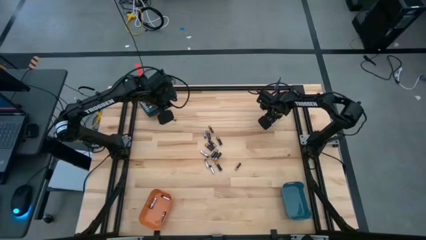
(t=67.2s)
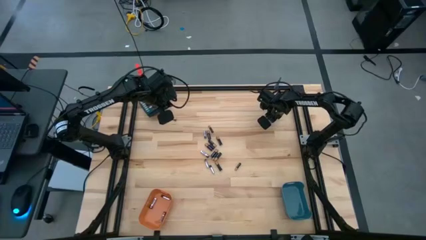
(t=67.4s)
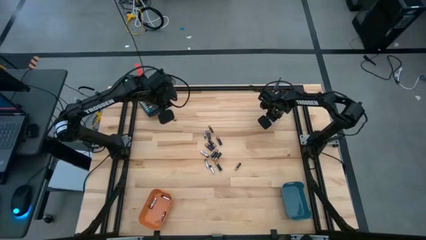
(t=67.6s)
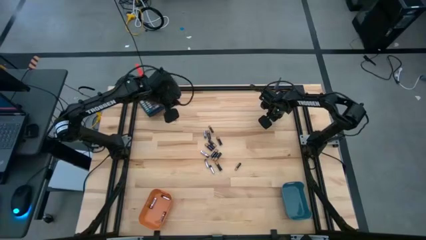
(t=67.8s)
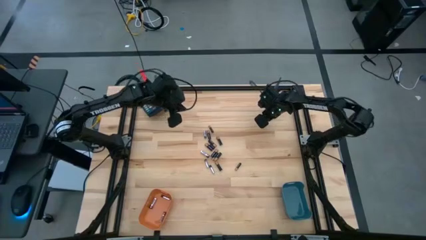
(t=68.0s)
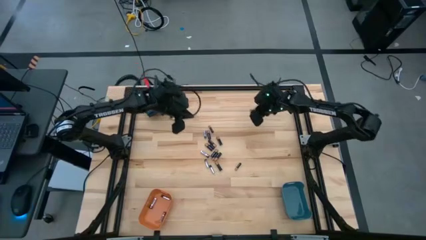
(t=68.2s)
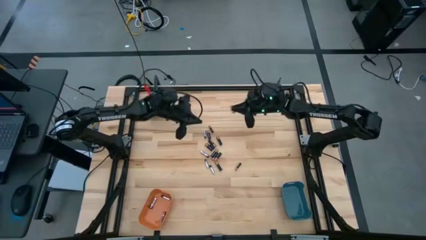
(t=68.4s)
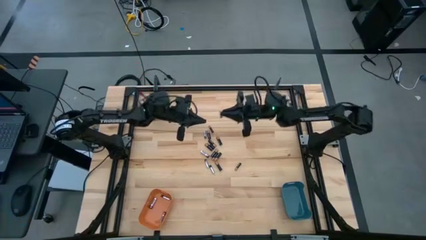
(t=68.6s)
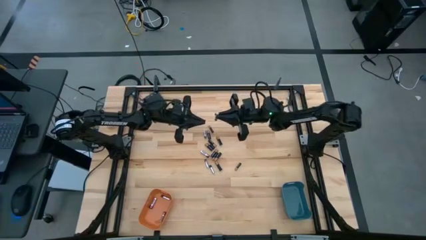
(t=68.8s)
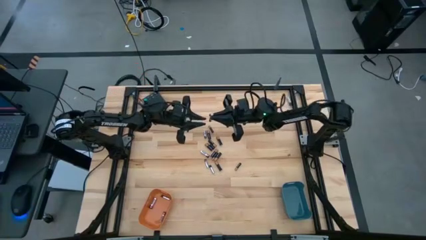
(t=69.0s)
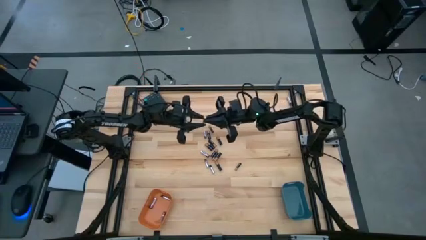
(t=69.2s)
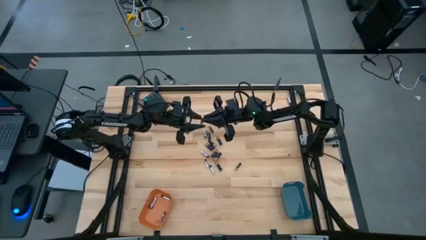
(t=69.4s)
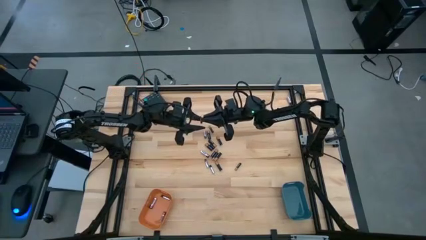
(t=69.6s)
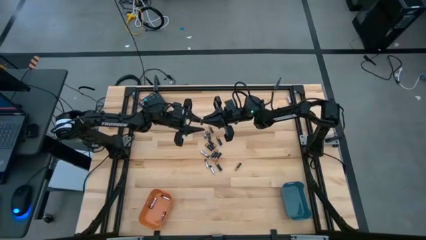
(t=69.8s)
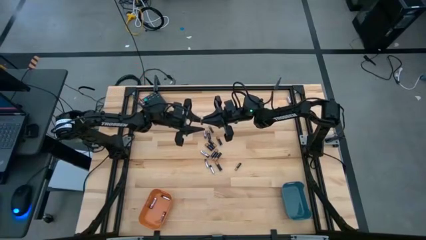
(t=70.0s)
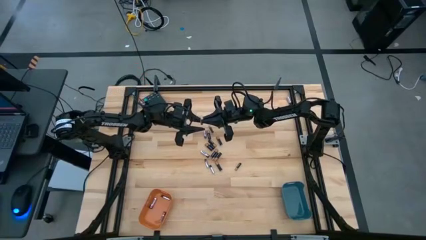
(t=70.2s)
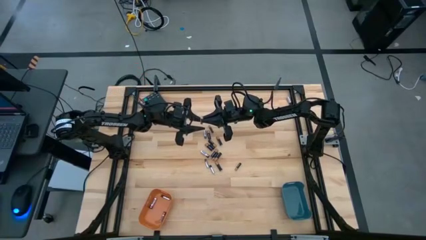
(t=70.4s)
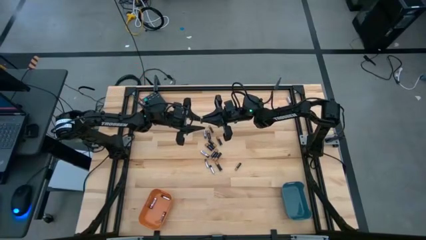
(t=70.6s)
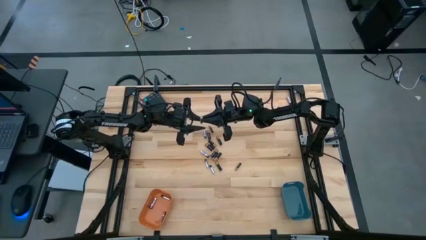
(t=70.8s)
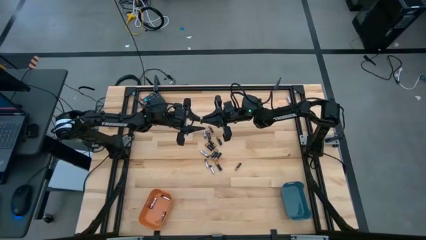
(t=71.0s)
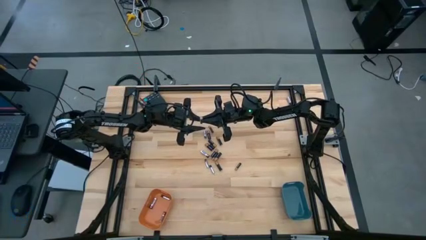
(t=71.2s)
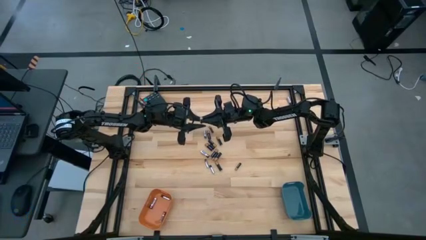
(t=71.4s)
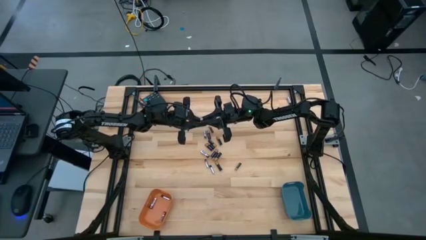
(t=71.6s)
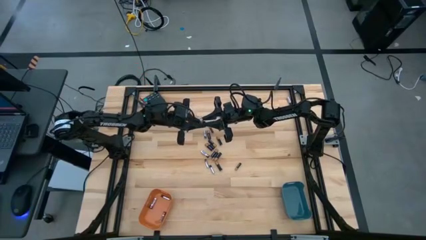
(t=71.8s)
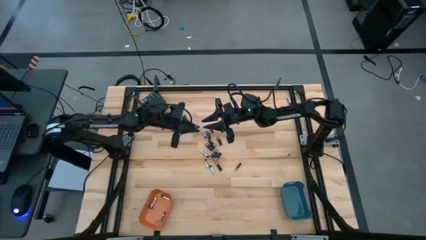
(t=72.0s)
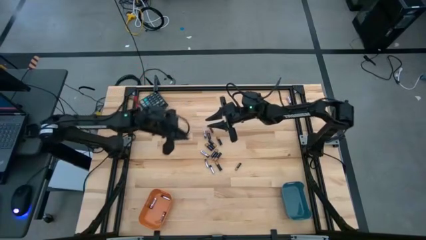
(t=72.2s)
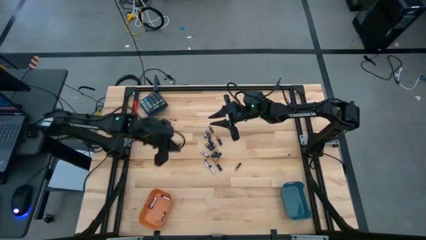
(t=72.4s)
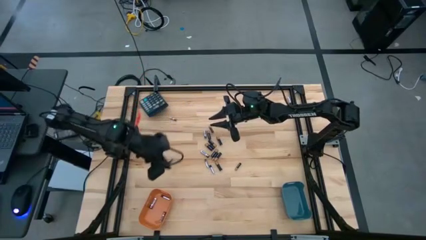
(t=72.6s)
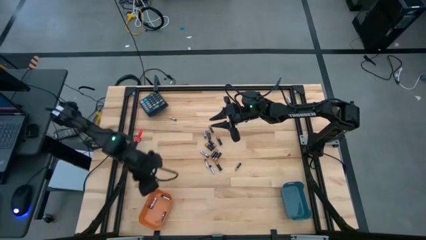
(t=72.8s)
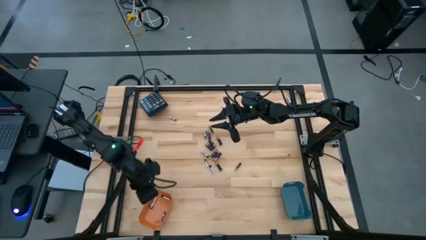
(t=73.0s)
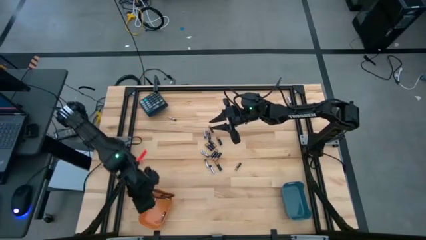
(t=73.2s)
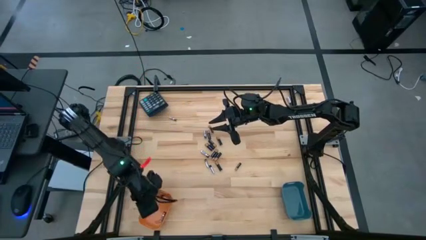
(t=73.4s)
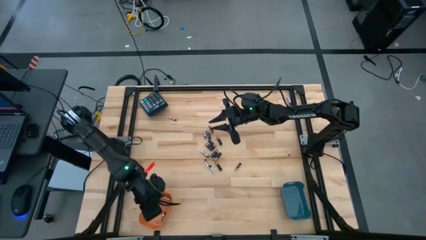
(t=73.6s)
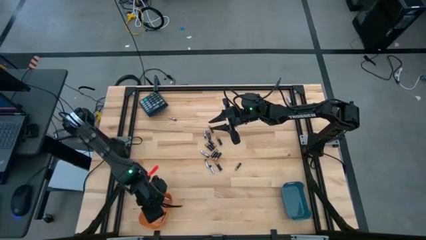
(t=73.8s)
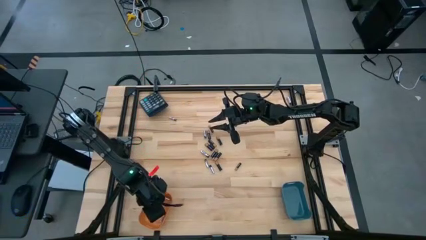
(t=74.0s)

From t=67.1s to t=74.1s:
Task: Sort batteries
Put the silver battery into the orange bin

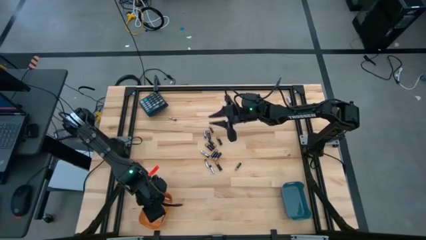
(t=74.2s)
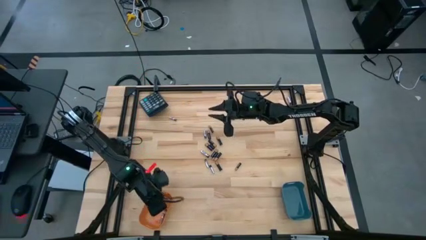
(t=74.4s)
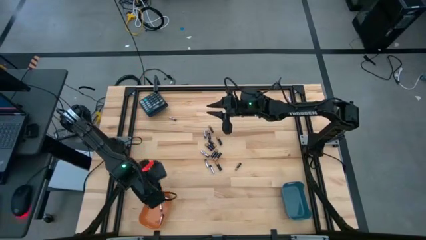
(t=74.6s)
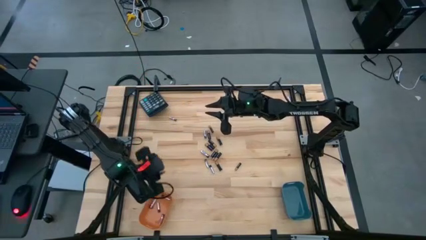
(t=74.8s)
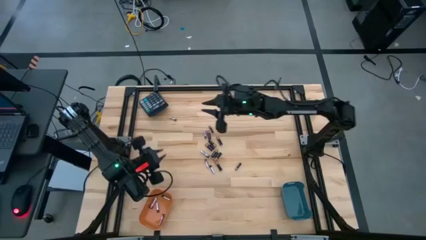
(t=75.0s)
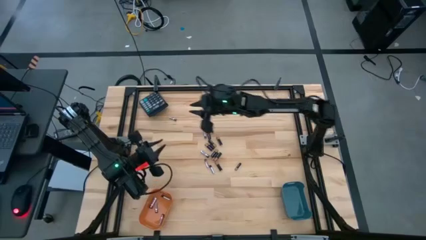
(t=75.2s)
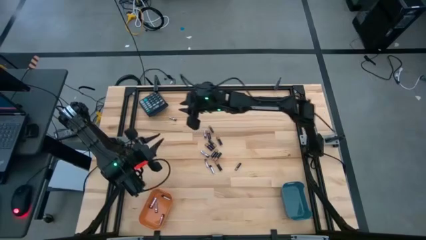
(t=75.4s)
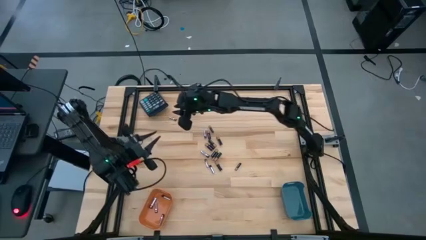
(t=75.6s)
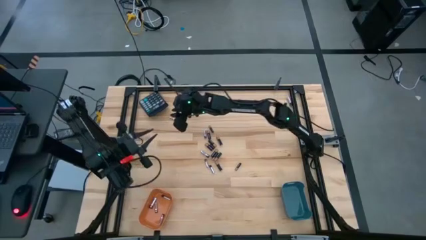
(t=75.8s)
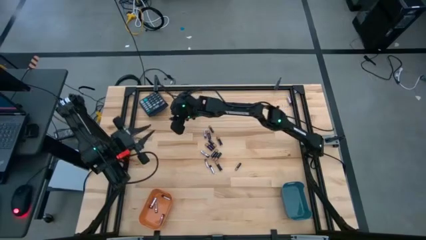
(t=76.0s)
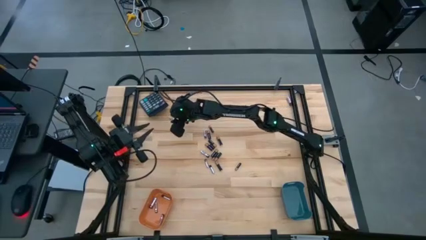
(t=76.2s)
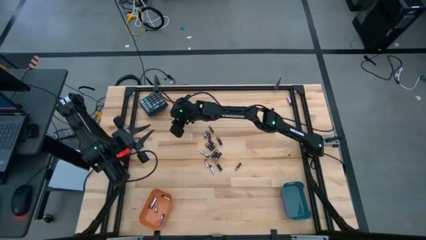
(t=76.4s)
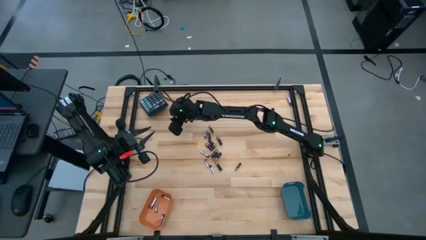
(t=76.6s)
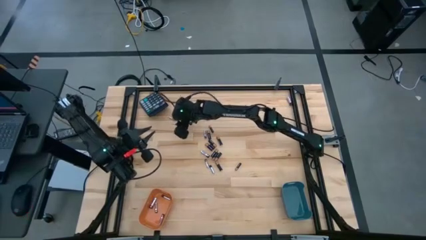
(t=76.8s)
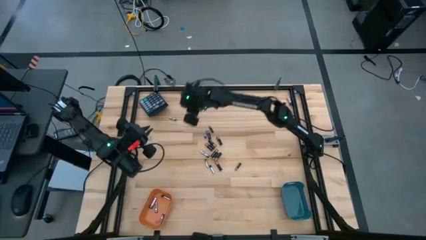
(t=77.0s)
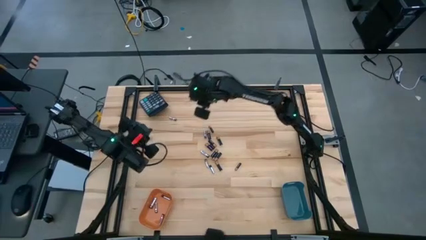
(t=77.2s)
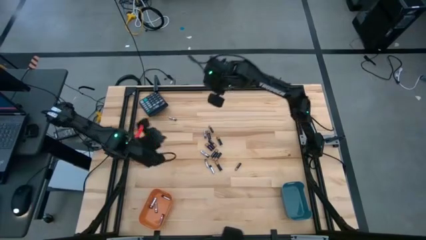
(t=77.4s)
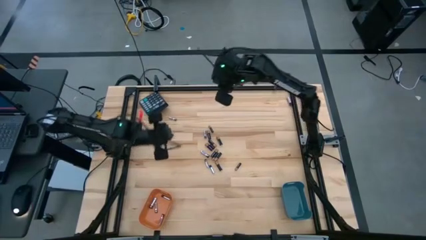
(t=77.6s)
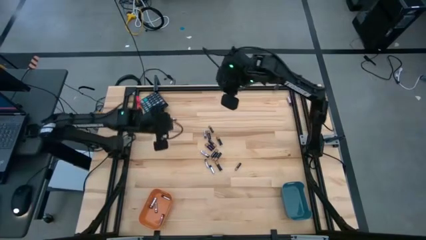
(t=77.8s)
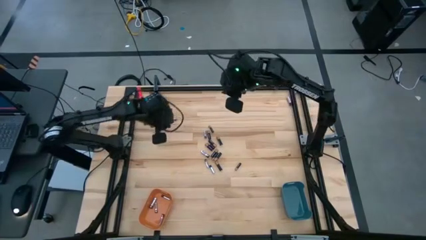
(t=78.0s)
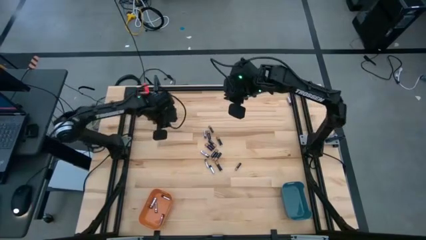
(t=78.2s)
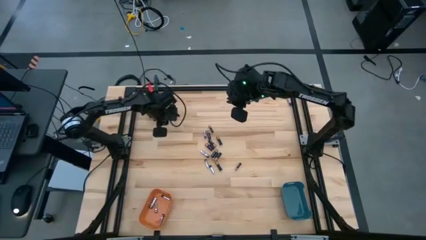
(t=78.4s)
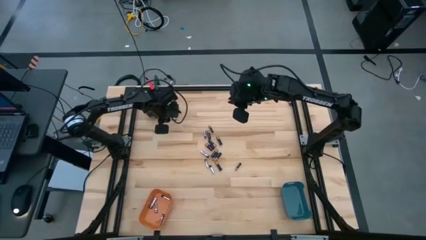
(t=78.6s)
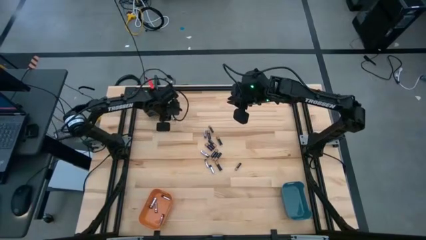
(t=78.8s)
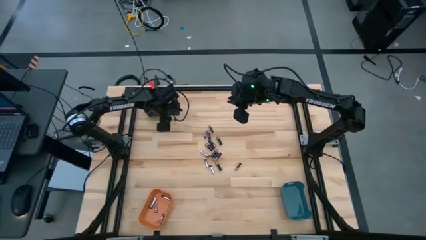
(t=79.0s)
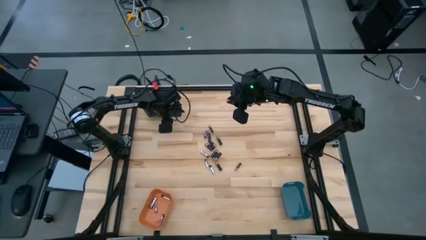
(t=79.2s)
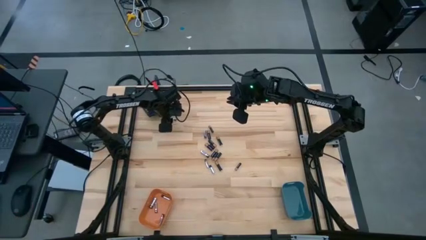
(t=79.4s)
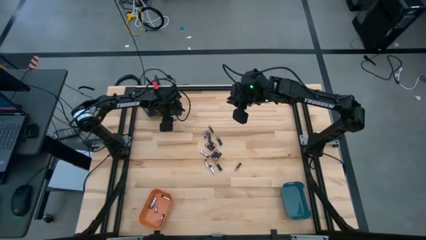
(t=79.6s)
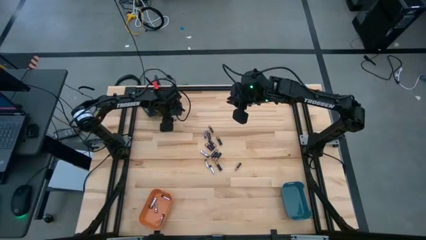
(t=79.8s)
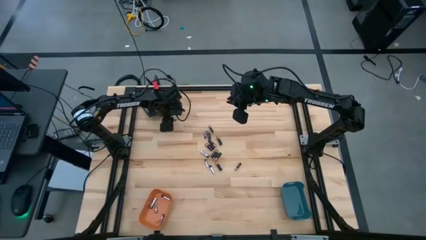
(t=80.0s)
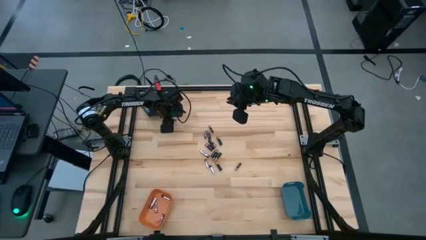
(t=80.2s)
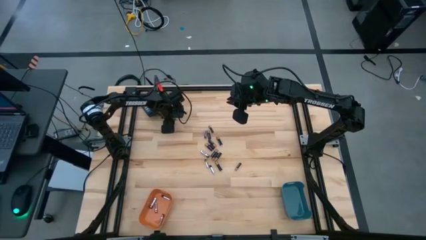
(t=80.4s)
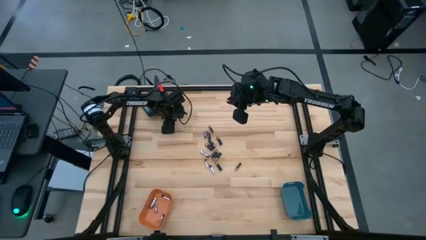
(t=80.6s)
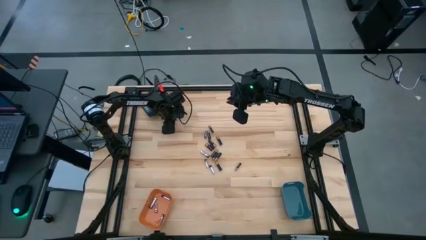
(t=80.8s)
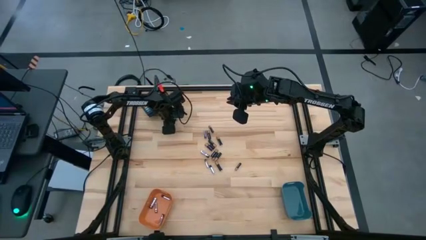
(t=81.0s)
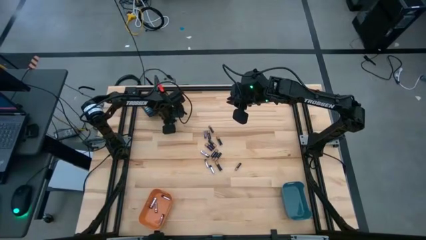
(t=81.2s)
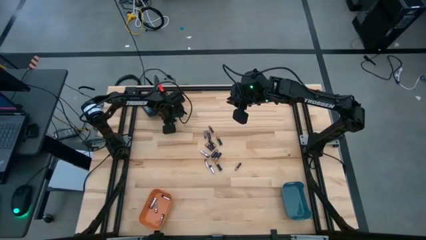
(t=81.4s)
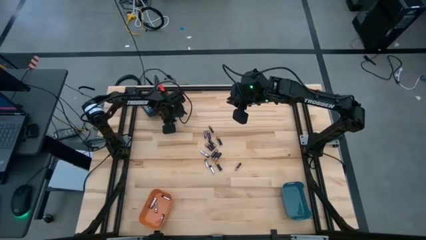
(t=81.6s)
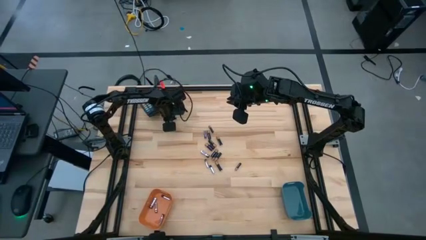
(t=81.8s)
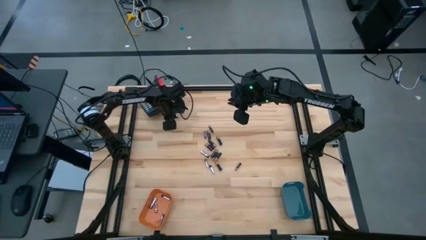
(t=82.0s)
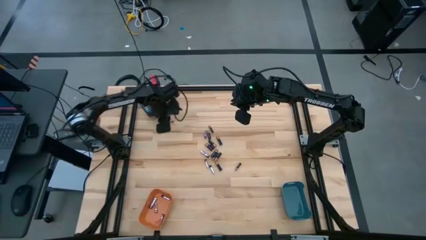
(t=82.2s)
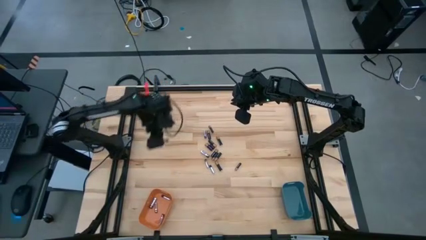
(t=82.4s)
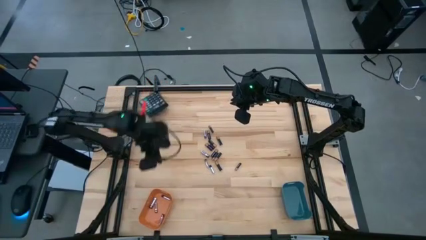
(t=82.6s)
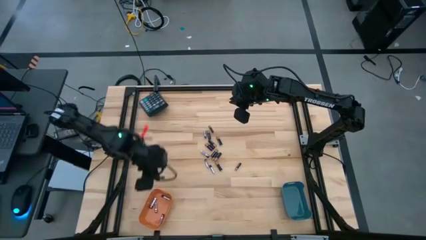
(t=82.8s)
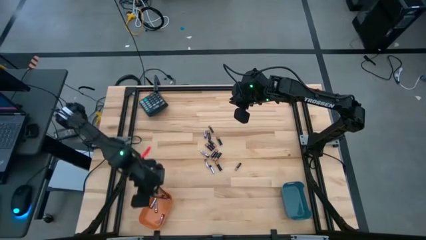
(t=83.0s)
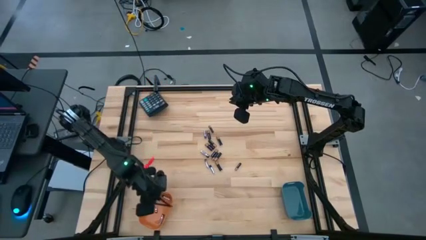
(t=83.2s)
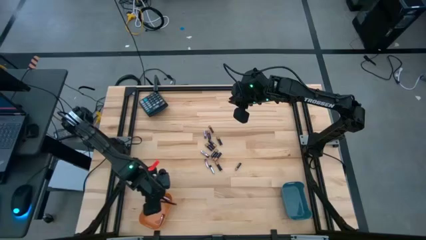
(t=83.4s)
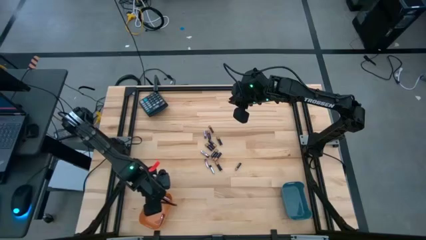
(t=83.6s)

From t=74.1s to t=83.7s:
Put the silver battery into the orange bin

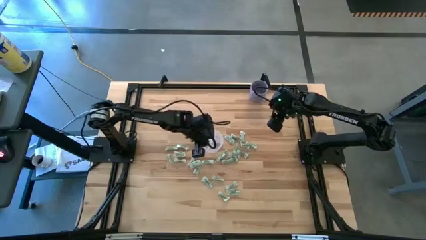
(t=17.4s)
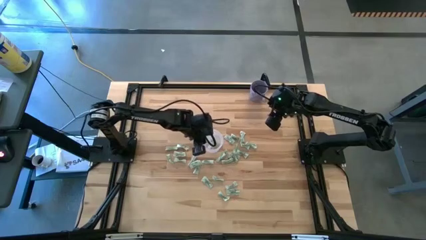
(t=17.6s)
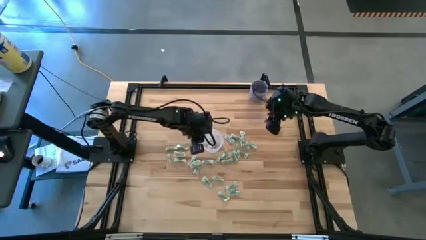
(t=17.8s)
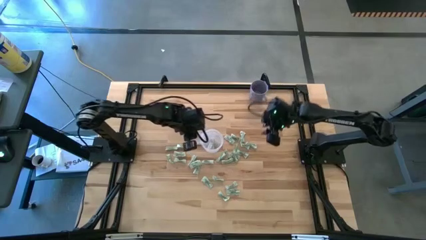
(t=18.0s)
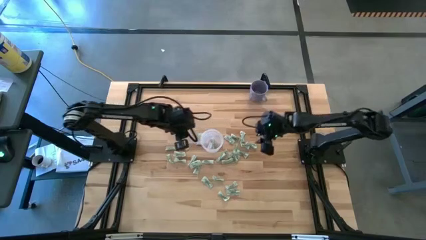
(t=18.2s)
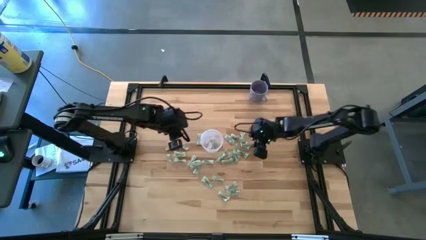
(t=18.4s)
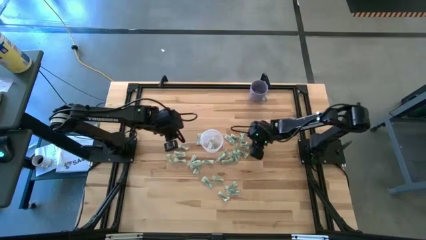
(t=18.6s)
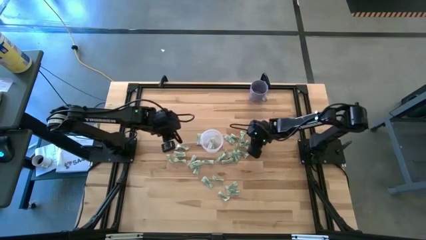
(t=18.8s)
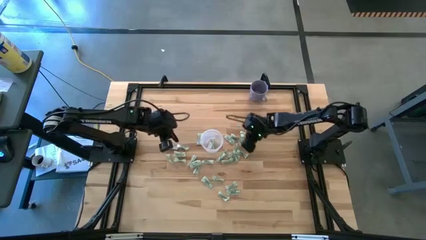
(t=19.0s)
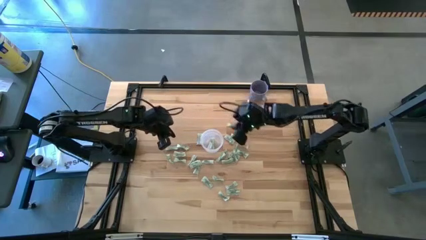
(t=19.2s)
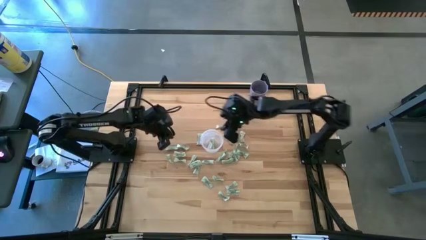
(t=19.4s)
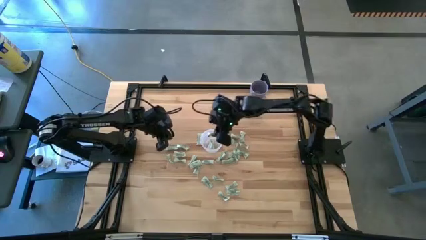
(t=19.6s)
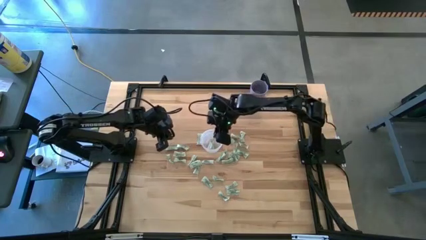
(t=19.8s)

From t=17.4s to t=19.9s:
Task: Pick and place Stevia / Truvia into bins
Put the white stevia packet into the transparent container
